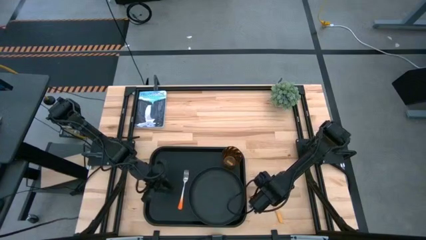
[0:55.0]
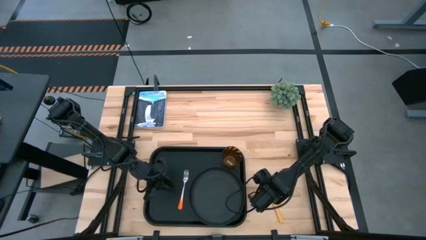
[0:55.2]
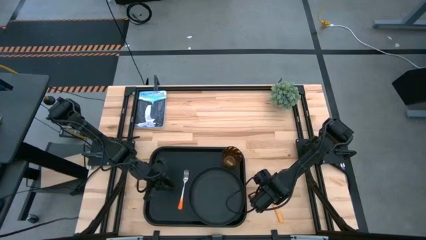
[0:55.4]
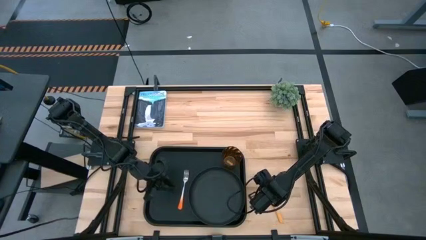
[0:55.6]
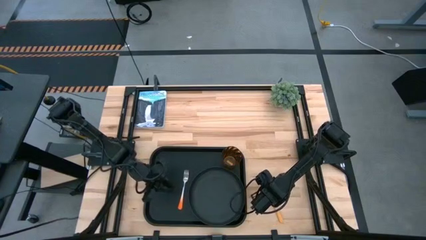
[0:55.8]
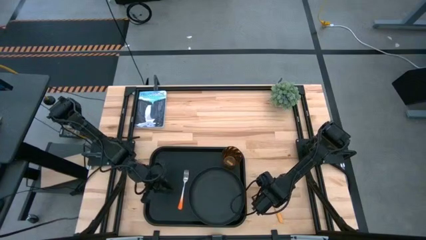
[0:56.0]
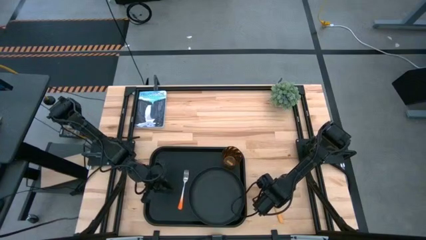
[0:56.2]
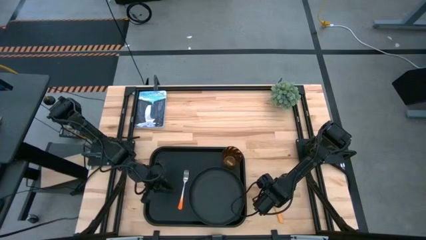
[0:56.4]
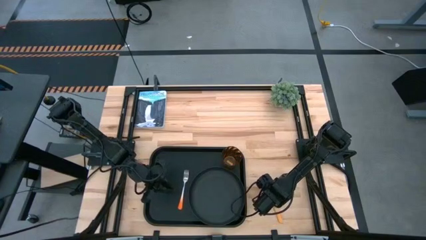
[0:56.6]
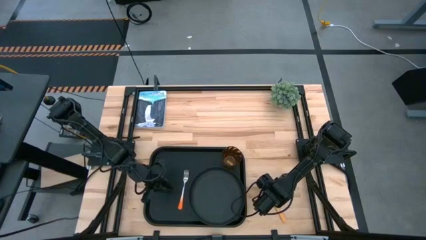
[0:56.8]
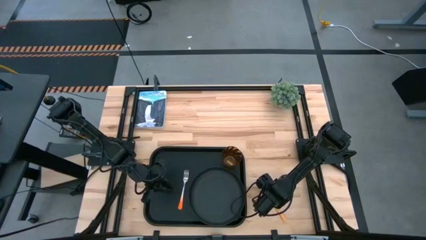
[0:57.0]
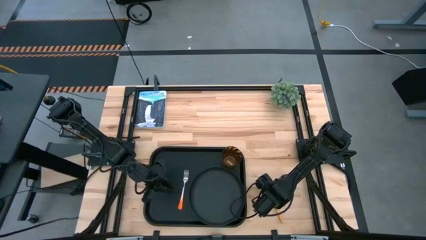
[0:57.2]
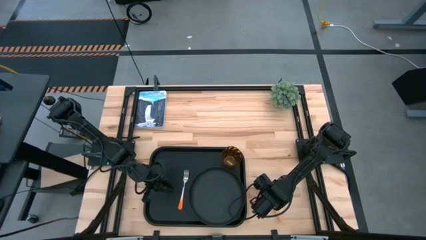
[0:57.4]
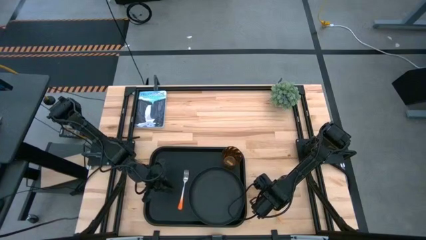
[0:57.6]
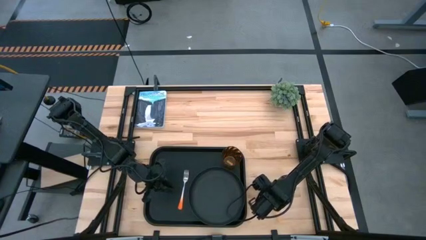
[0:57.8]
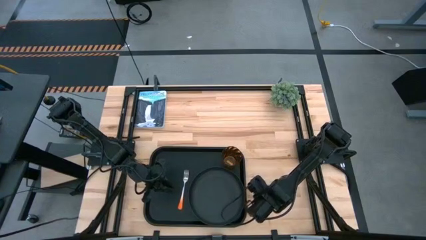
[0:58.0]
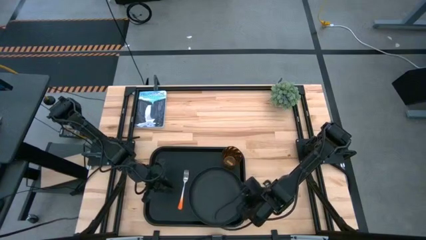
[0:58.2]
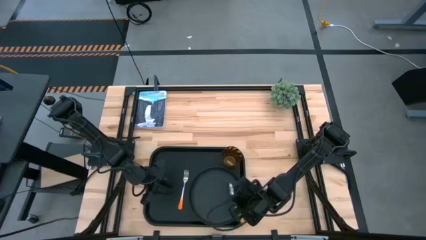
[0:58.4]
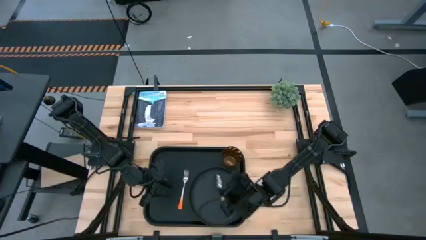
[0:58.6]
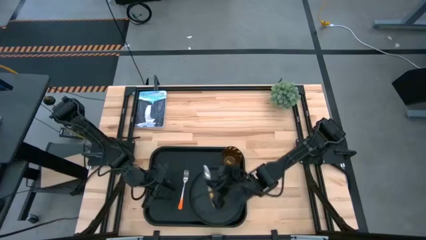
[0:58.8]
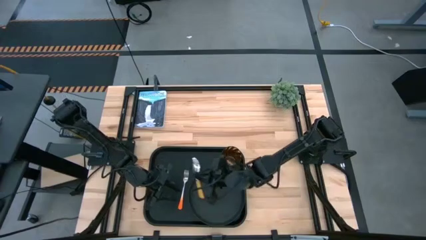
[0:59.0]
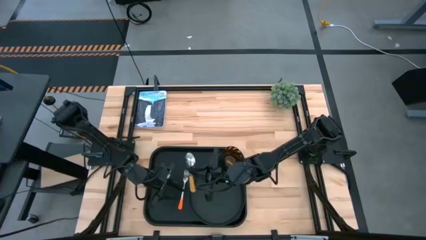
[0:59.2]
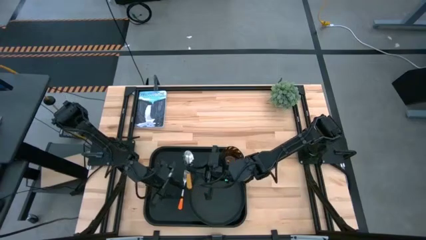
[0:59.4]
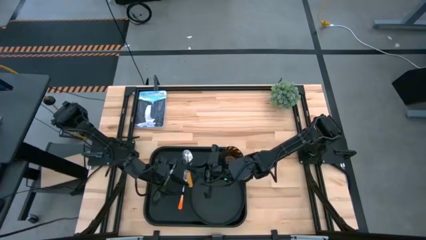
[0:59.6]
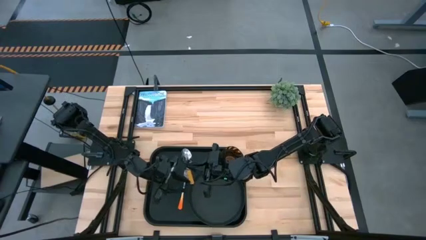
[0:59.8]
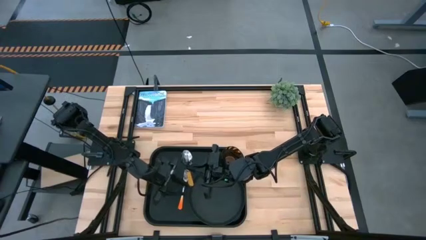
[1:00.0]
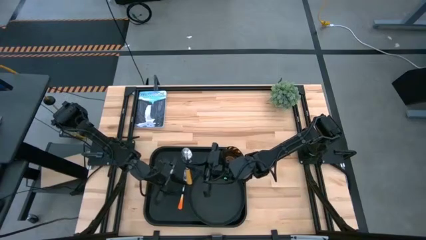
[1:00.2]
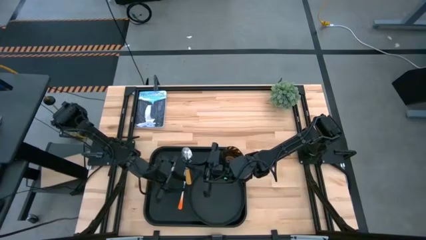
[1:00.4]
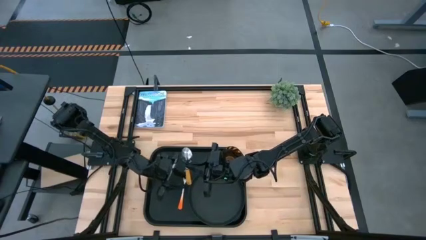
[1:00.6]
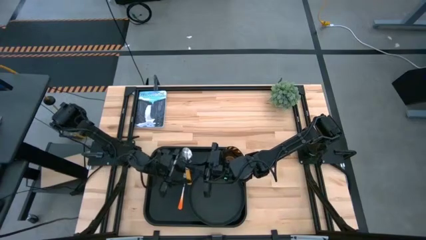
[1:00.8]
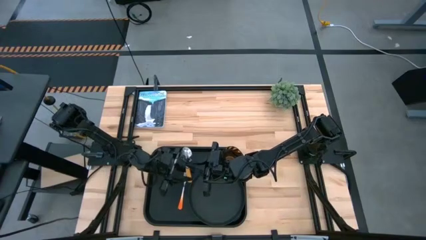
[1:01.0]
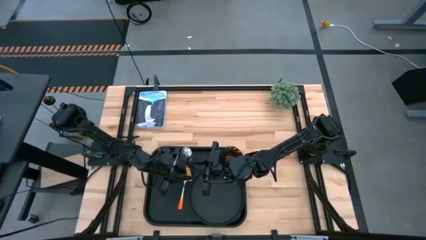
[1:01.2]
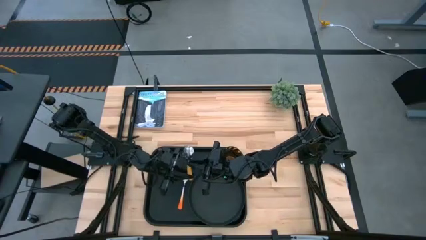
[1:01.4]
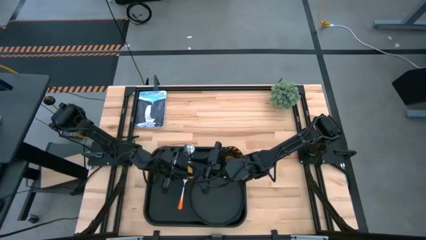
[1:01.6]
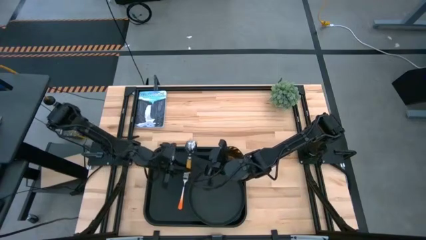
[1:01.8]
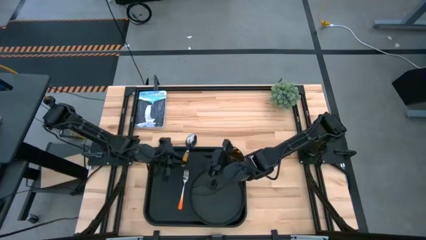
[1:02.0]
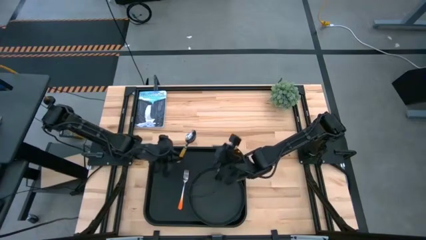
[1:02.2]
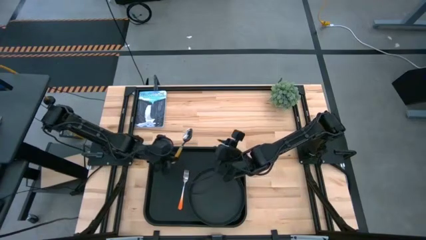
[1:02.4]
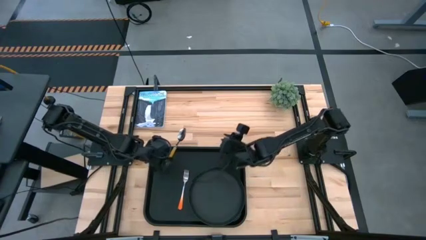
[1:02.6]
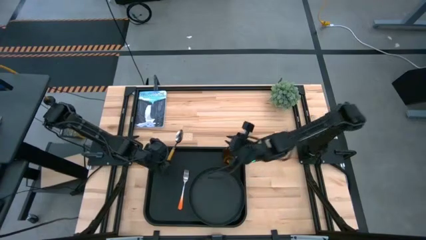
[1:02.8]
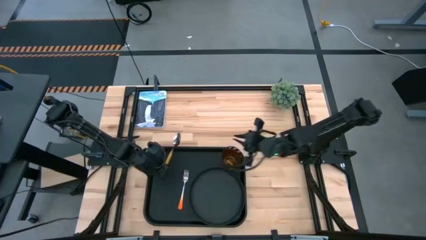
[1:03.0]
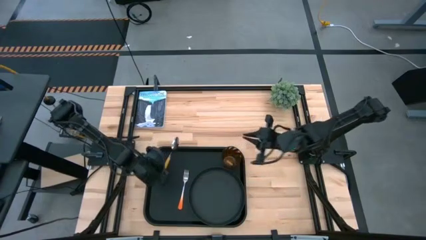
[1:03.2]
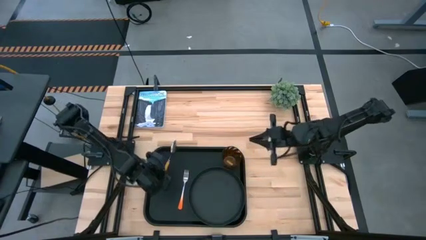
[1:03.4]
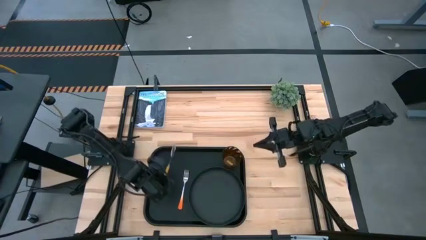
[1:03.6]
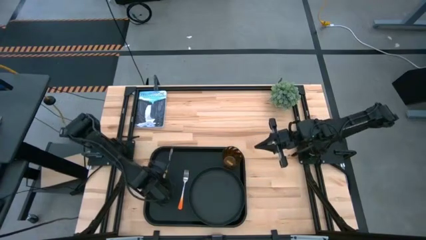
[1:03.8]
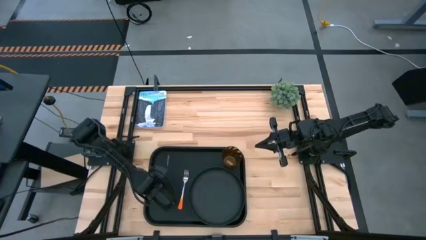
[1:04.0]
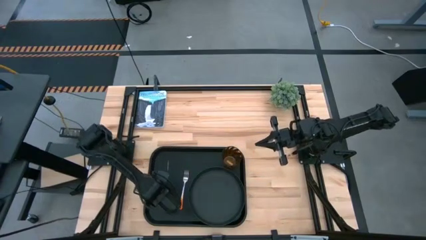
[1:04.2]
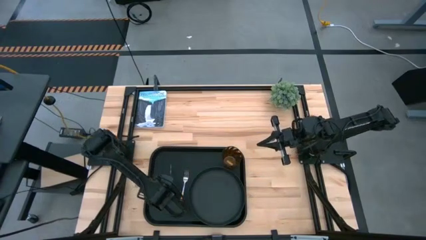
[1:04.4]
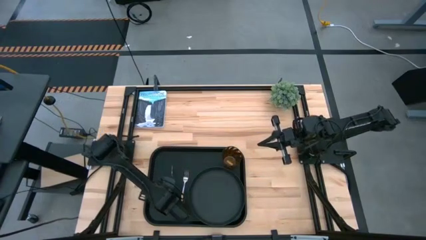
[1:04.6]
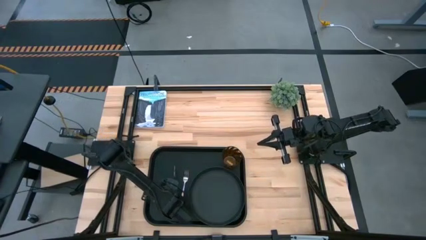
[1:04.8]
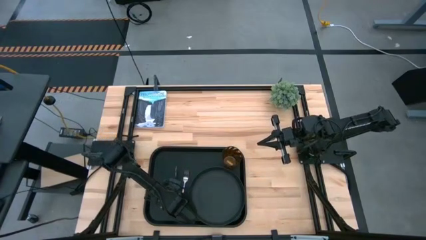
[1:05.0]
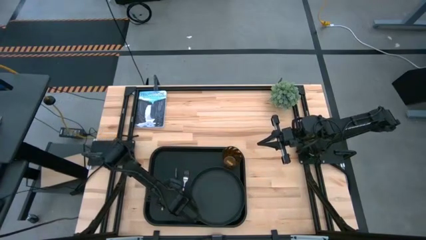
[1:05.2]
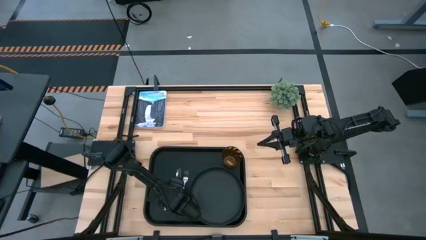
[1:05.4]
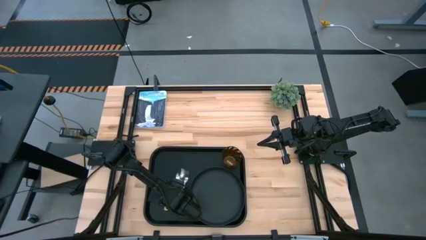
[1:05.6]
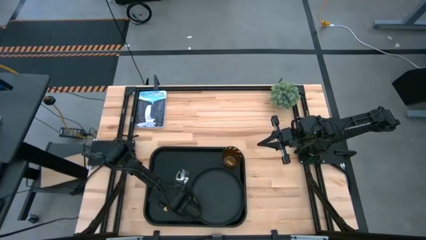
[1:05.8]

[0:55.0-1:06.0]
Task: Pick and place plate/cup/fork/spoon on tray
Put the yellow spoon to the left of the orange fork on the black tray

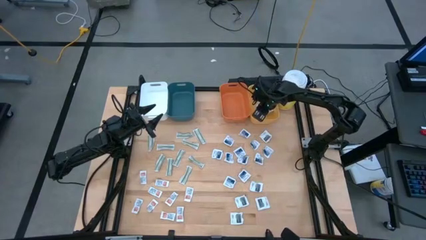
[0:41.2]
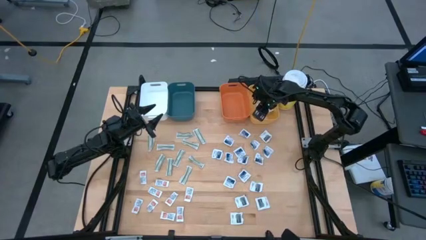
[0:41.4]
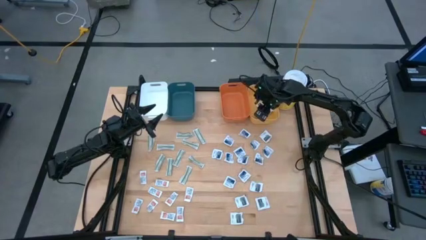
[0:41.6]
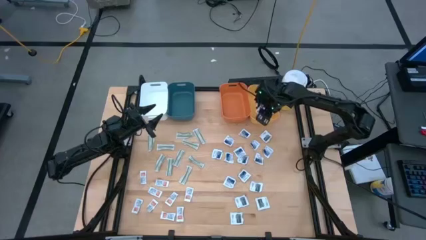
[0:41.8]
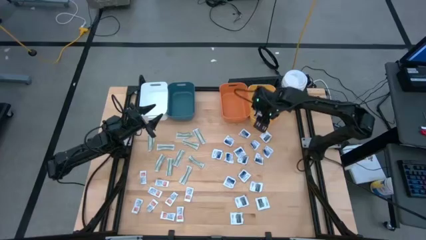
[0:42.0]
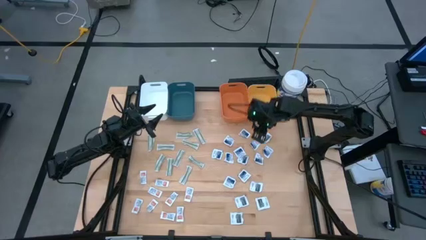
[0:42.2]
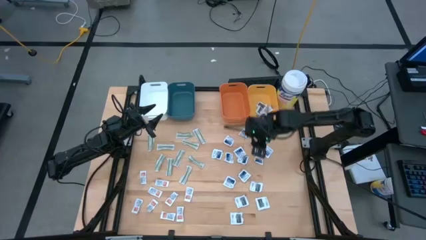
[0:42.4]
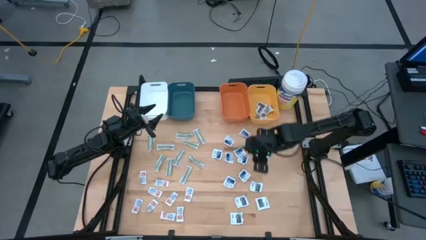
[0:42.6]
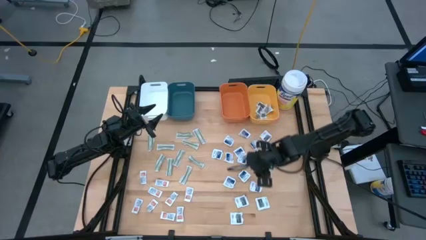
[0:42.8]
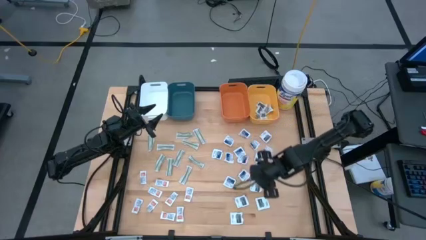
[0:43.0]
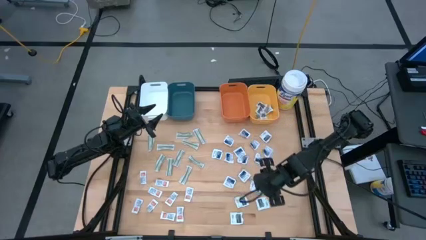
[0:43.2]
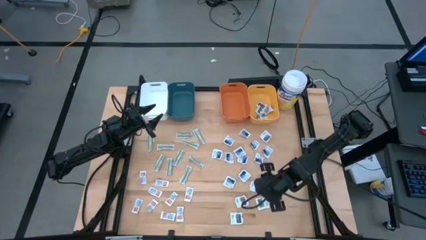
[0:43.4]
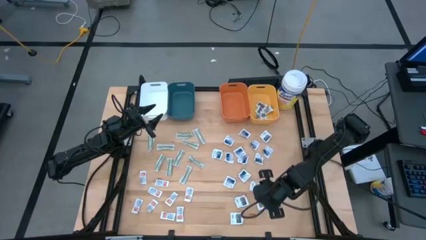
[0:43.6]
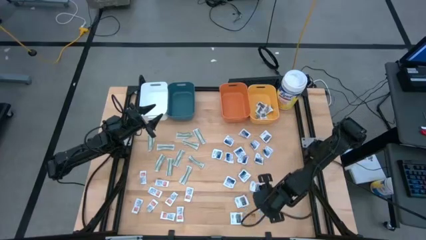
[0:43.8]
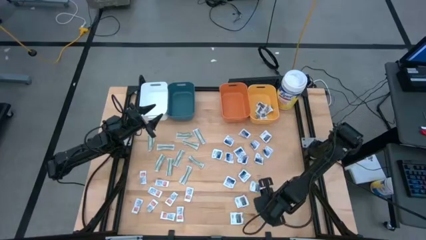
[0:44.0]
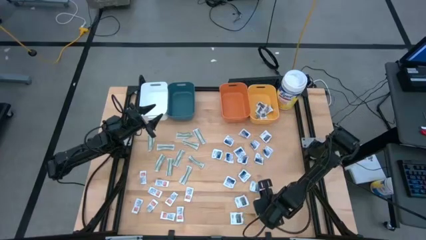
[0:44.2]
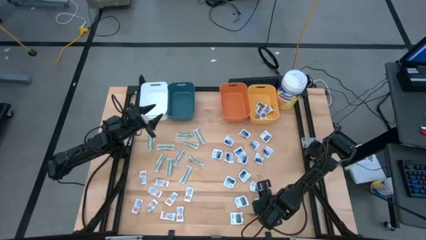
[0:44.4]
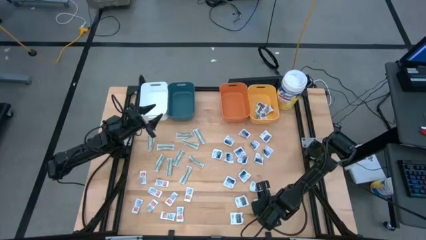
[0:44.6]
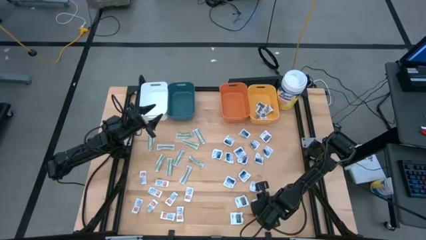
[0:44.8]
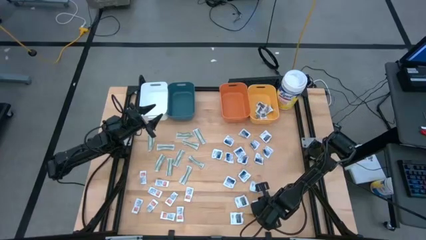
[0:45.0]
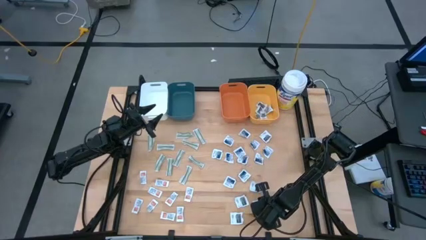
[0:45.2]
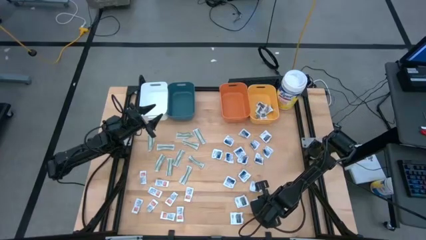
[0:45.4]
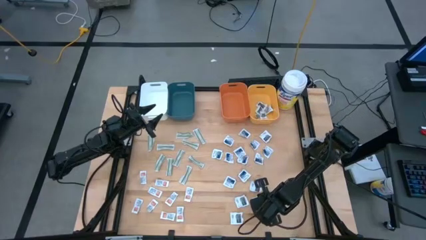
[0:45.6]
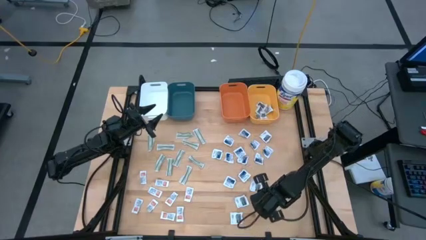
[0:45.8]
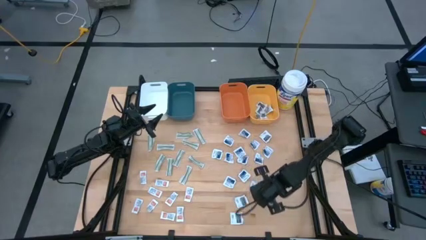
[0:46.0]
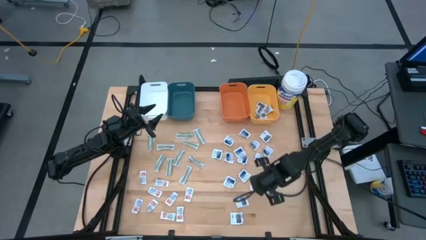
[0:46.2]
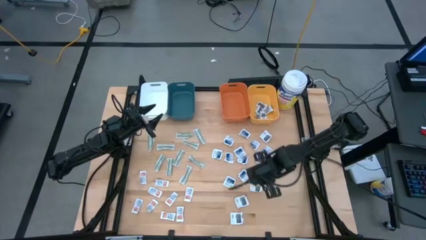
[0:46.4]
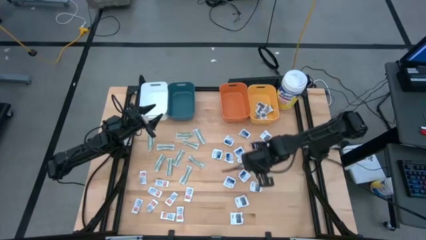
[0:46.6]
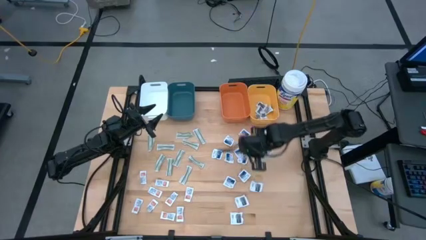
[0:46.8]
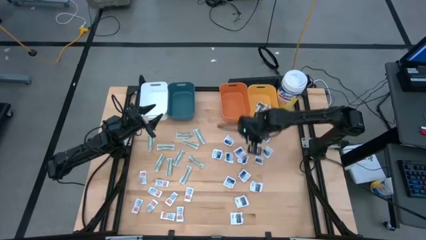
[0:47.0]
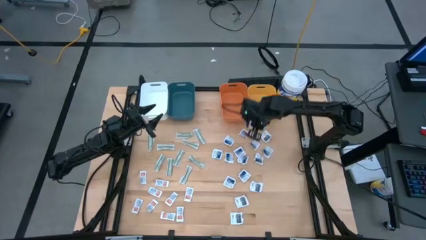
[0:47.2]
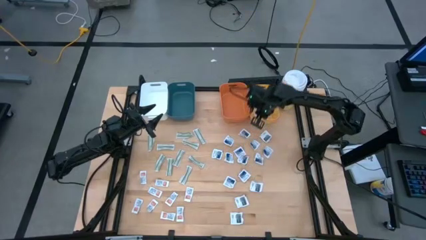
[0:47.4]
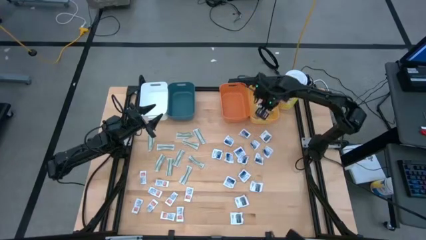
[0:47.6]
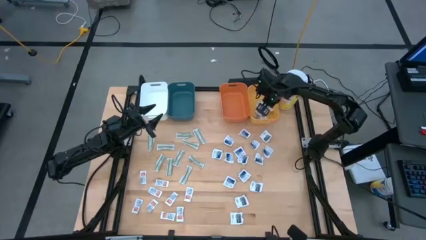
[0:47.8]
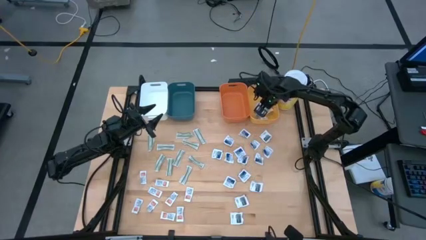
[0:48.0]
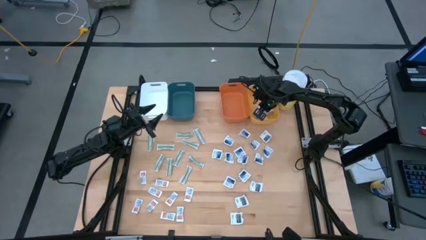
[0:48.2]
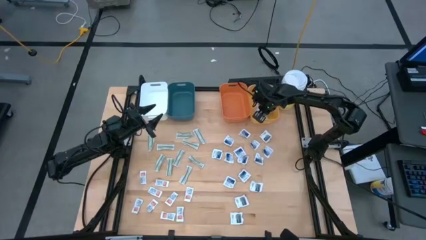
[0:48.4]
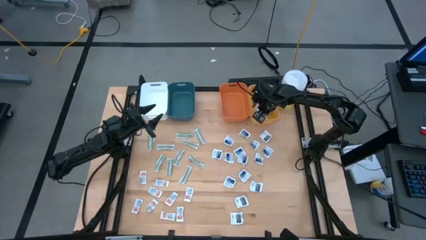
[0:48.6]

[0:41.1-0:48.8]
Task: Pick & Place First Aid Supplies
Put the towelette pack into the yellow bin
